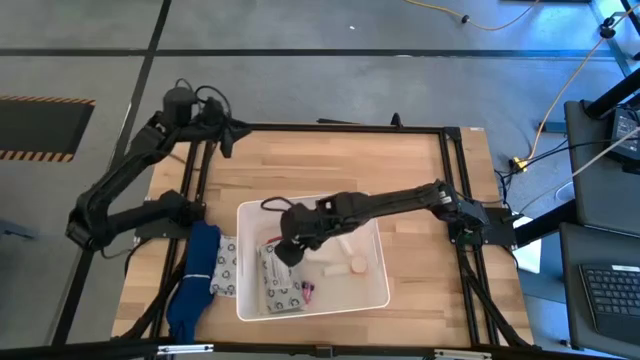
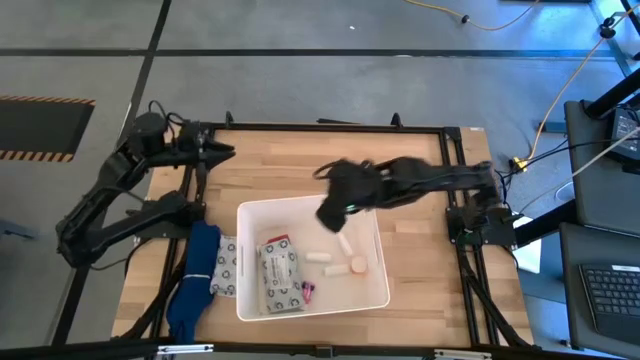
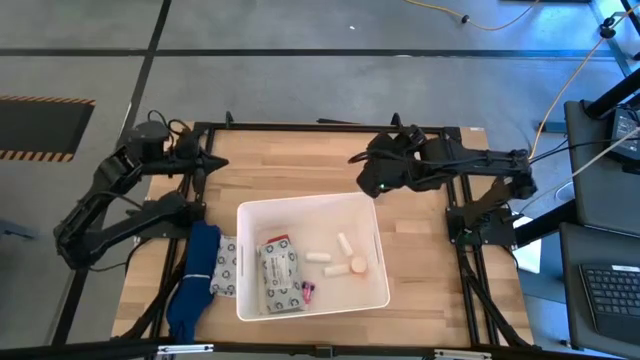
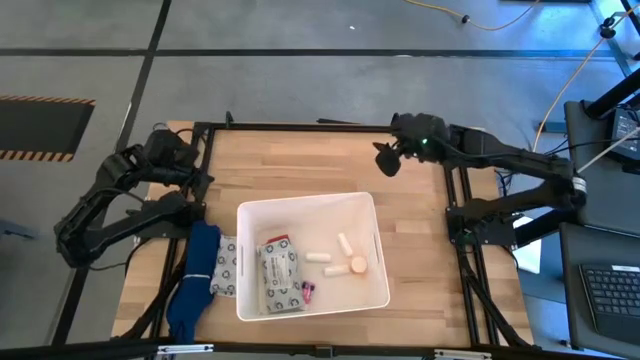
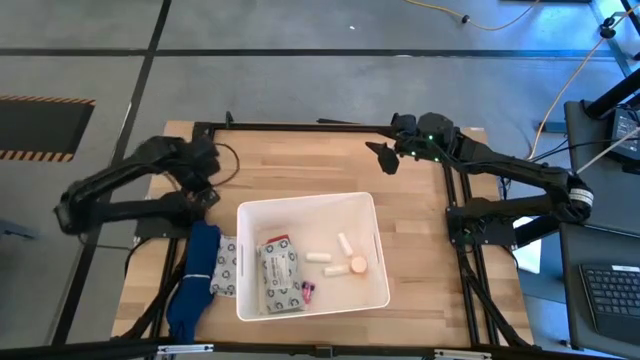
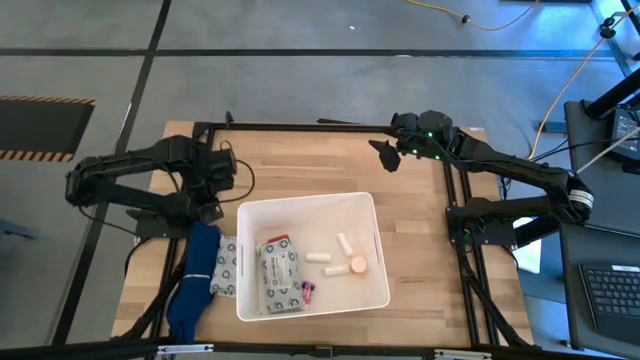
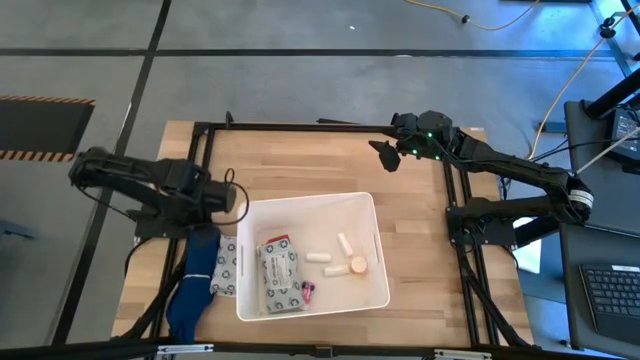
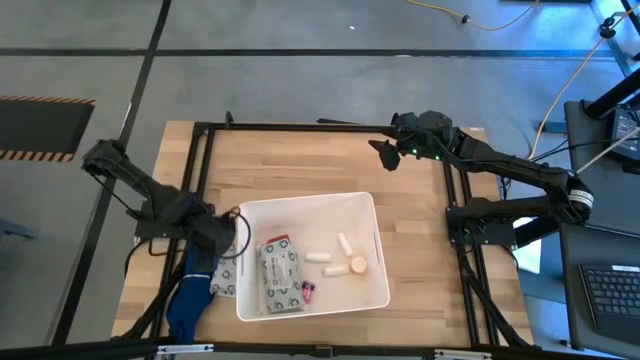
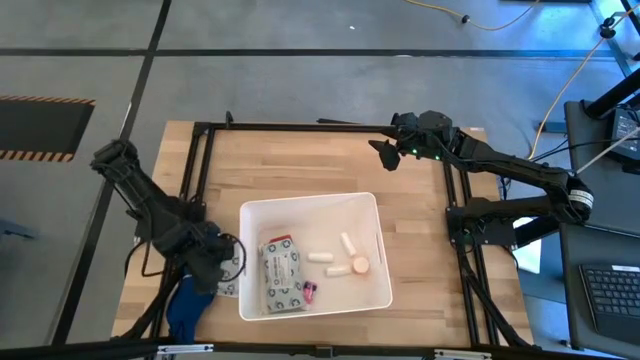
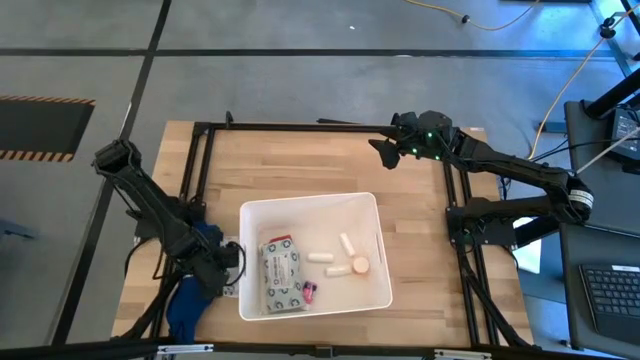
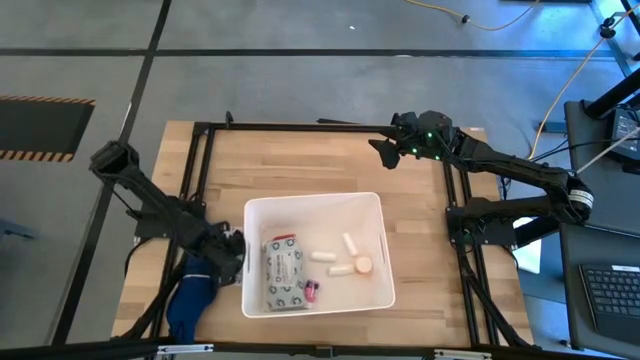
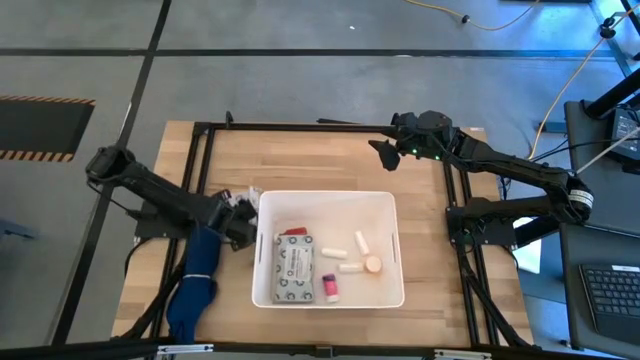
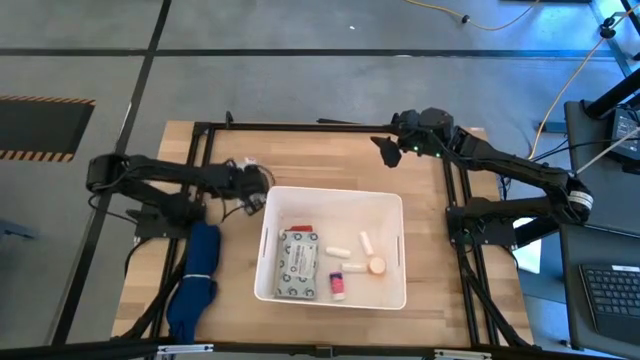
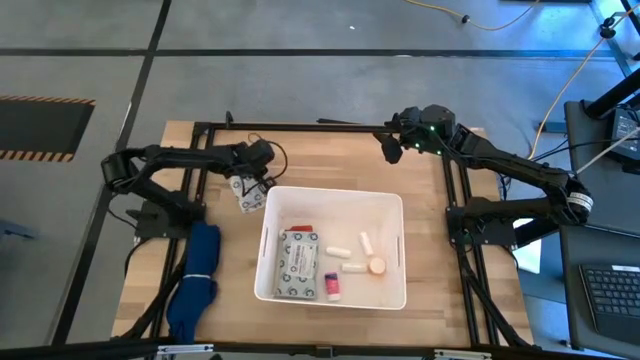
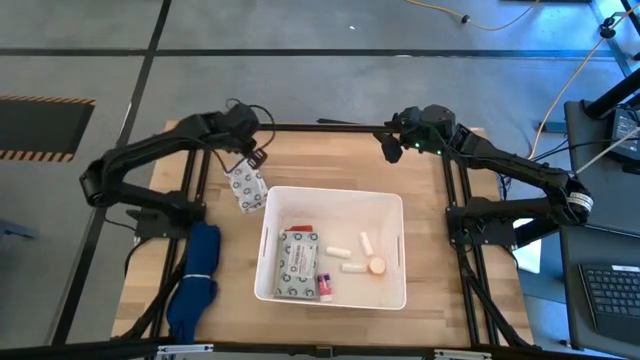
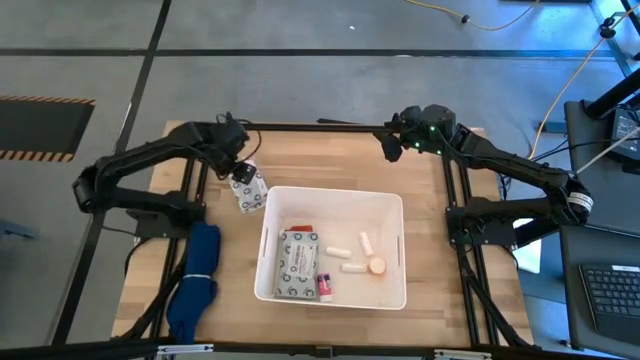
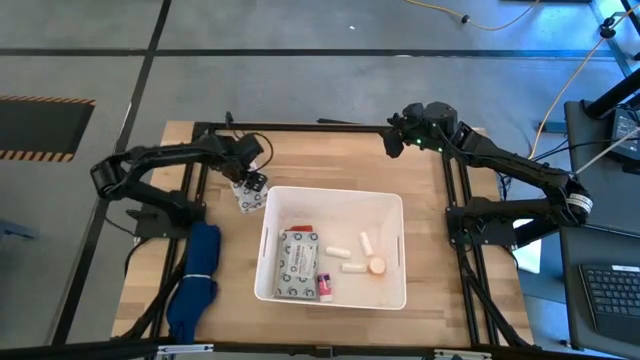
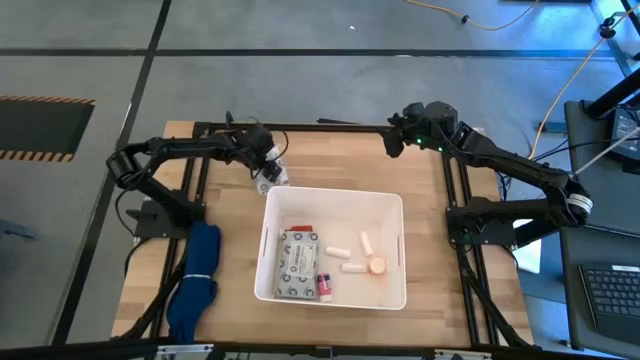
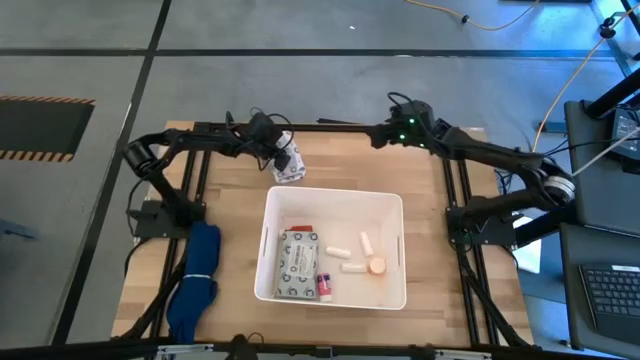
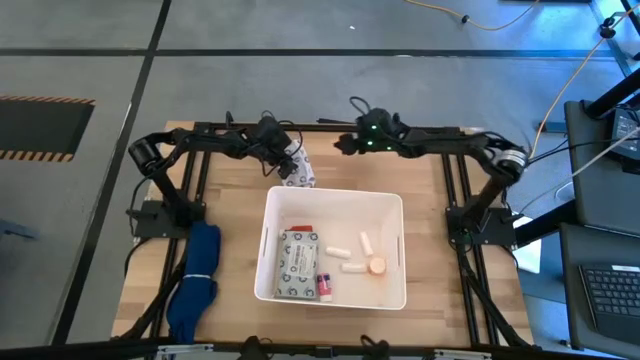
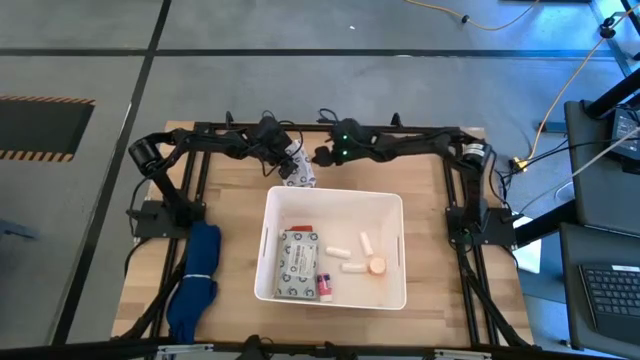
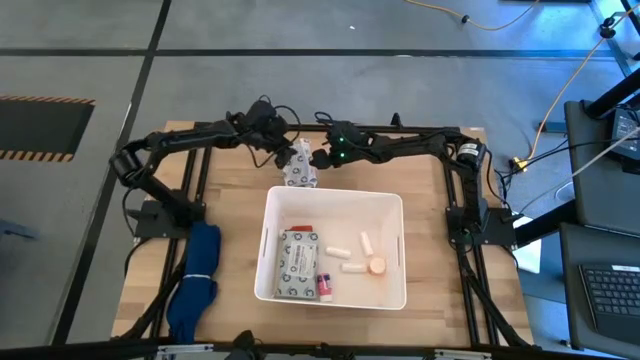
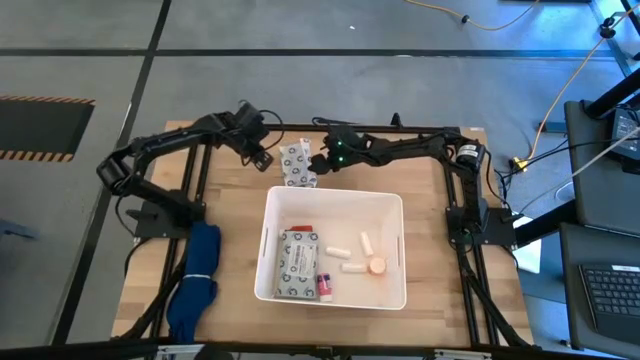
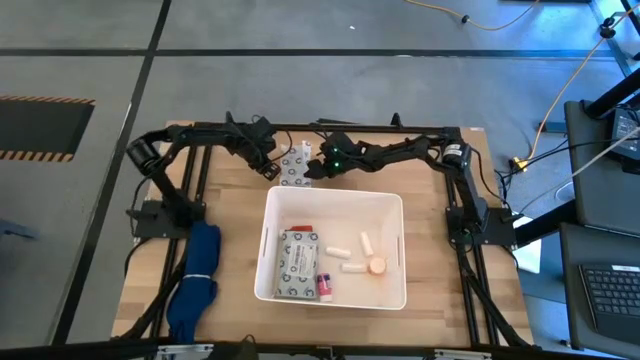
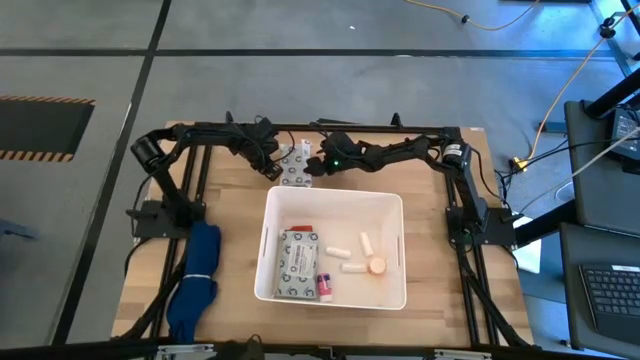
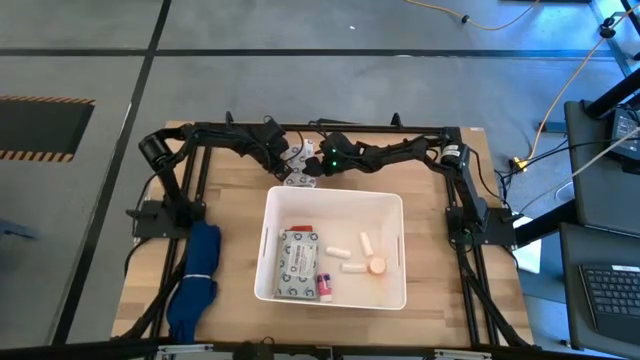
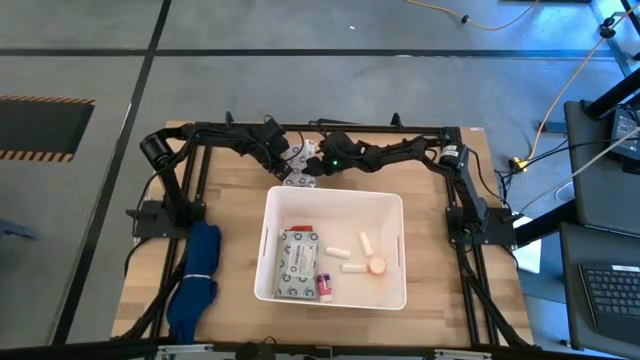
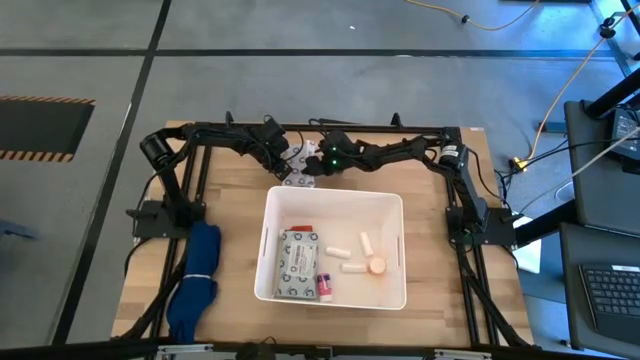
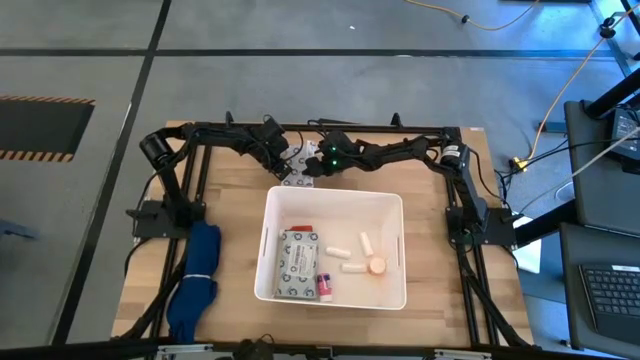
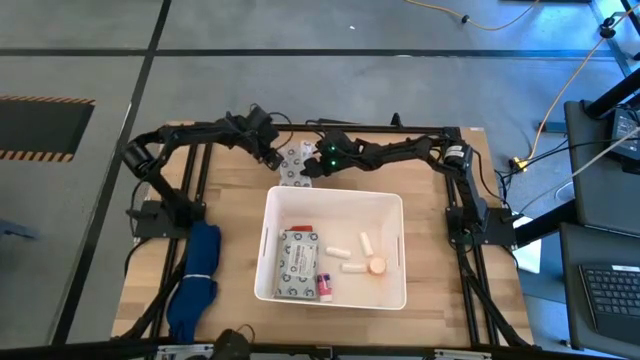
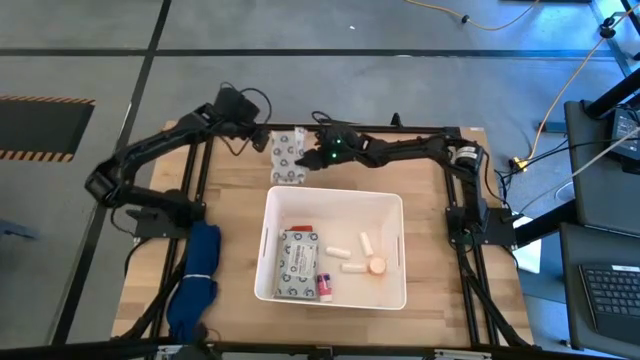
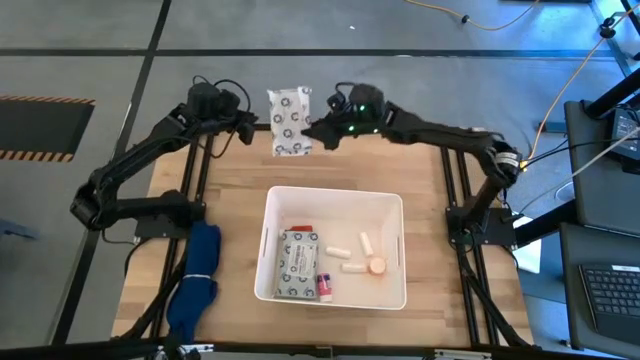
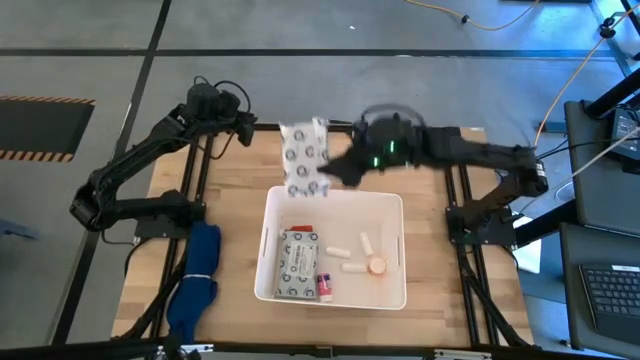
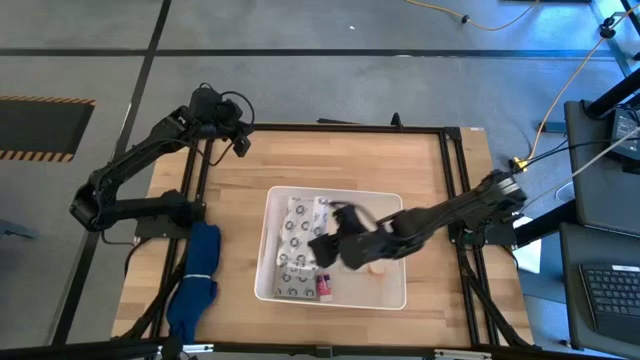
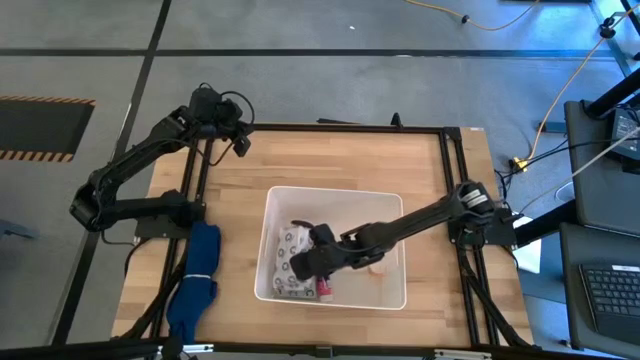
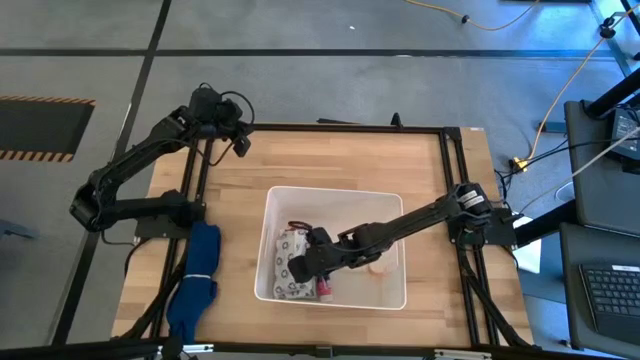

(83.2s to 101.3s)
Task: Pick & place medical supplies in basket/bin
Put the white mailer bag into the white bin

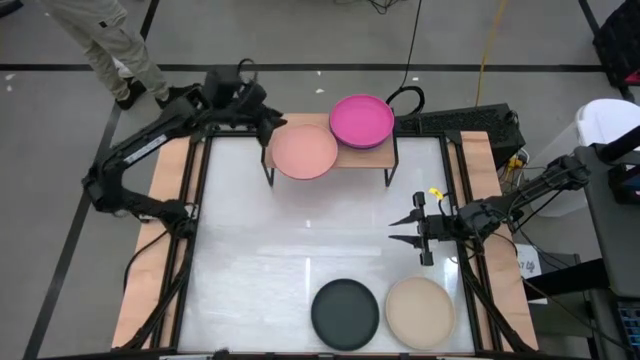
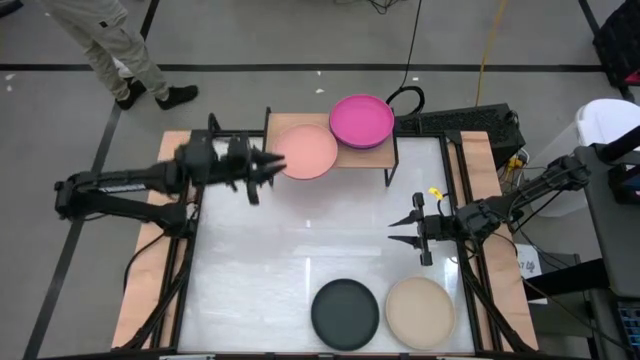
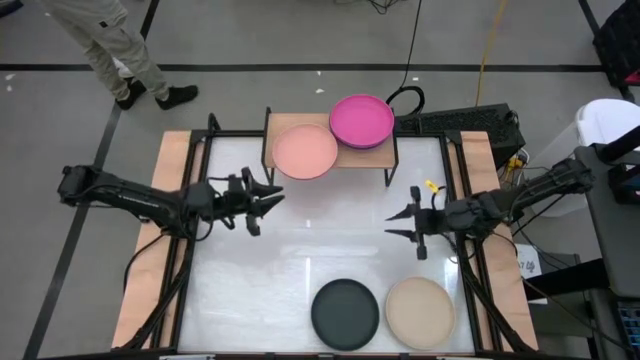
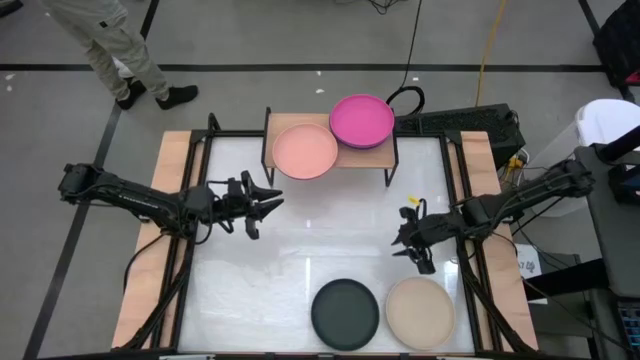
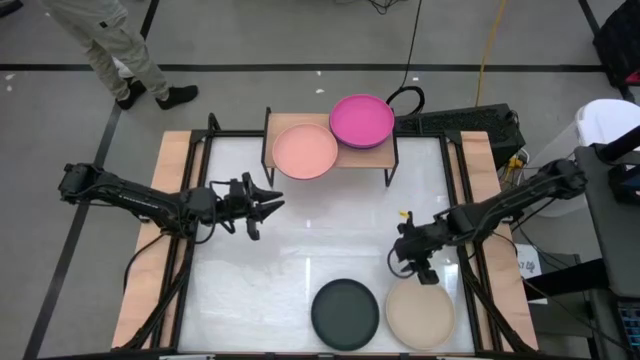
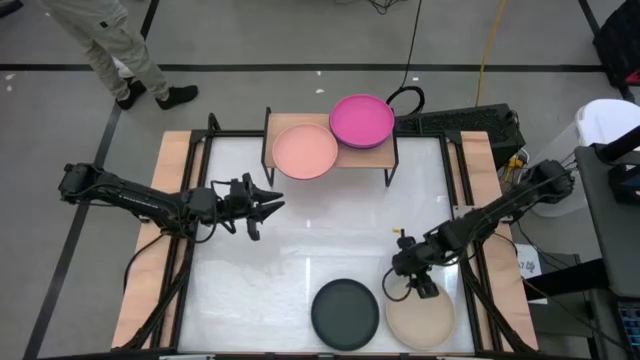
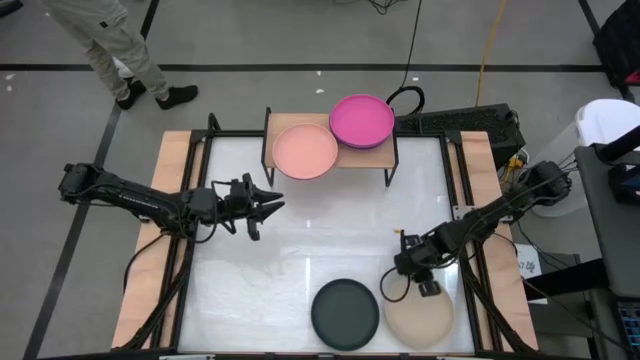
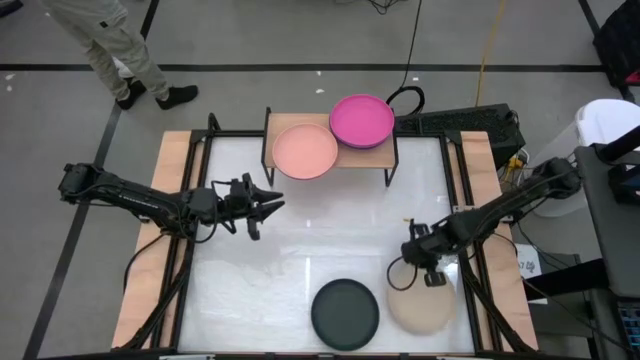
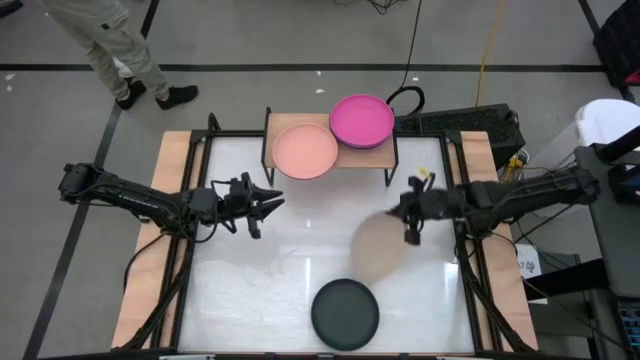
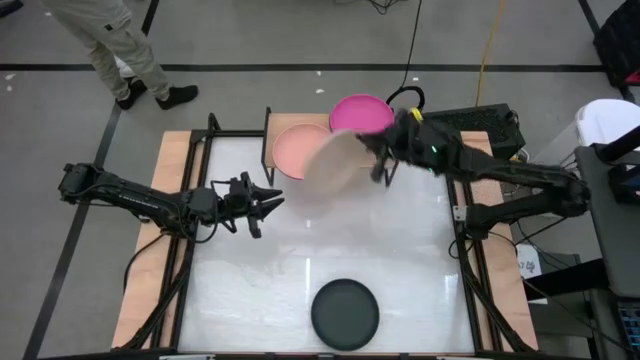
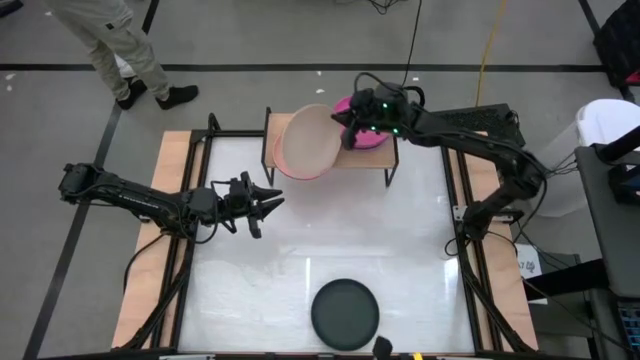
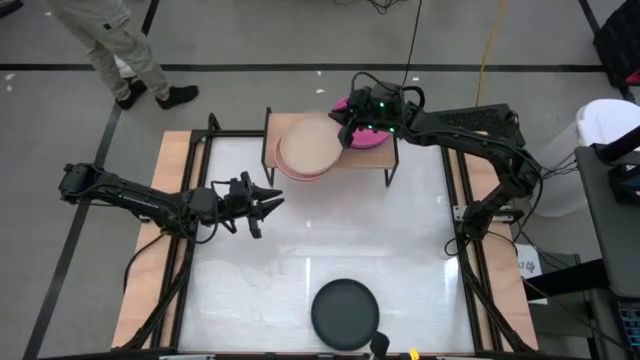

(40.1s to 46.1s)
Task: Place and stack plates onto a shelf
Stack the gray plate on top of the orange plate on the shelf
